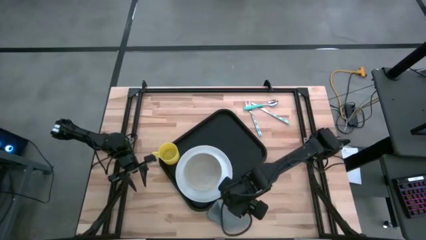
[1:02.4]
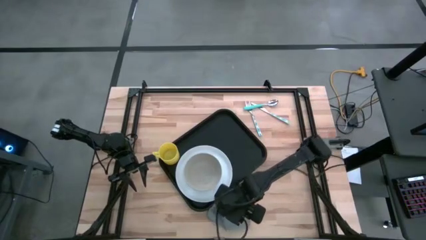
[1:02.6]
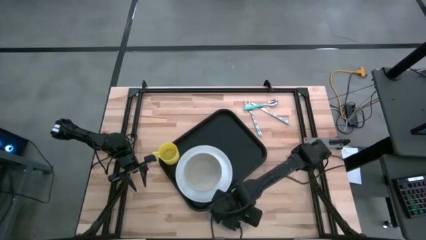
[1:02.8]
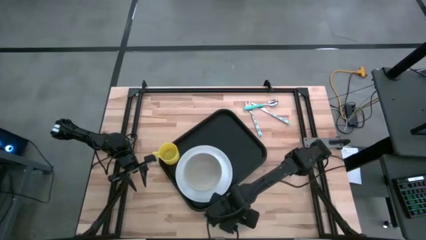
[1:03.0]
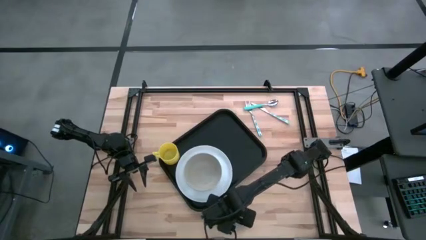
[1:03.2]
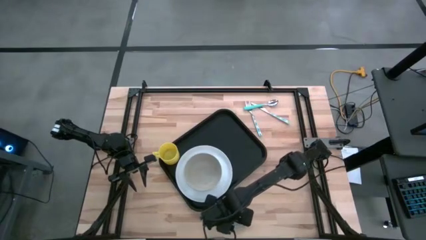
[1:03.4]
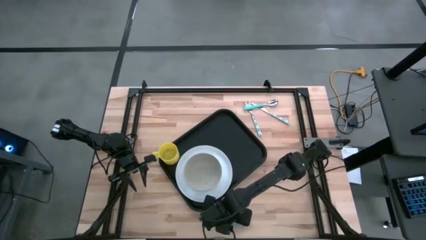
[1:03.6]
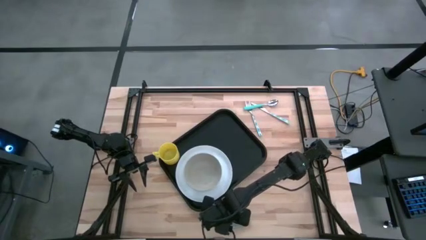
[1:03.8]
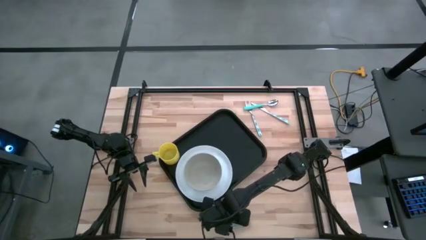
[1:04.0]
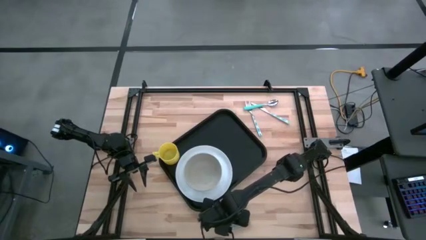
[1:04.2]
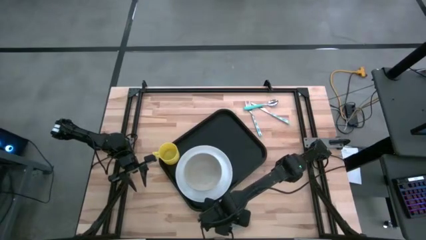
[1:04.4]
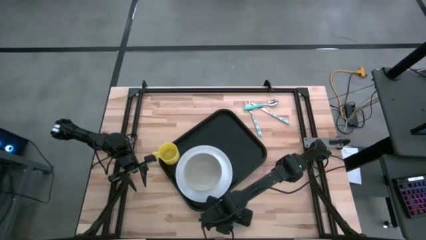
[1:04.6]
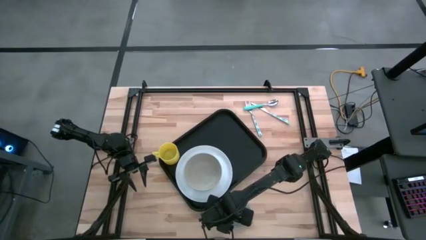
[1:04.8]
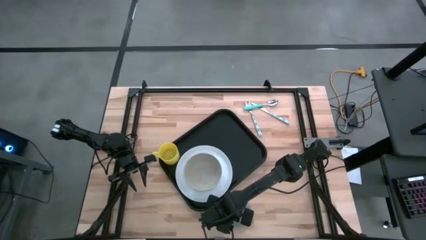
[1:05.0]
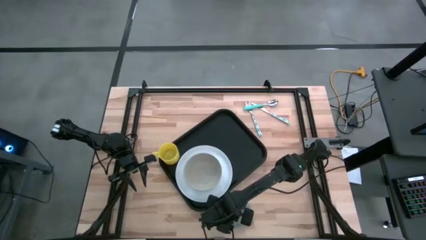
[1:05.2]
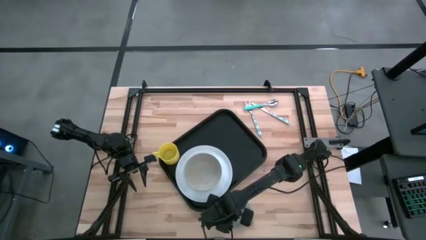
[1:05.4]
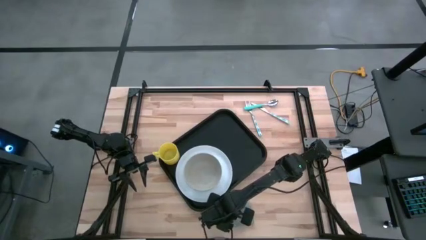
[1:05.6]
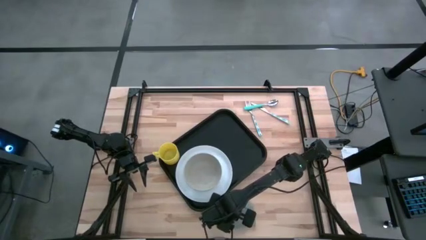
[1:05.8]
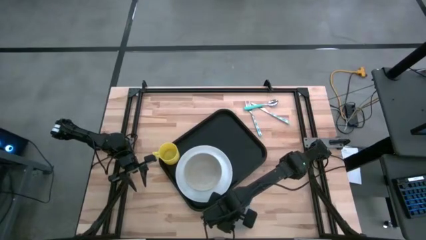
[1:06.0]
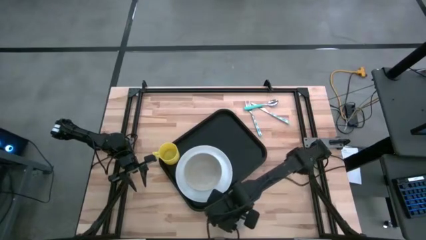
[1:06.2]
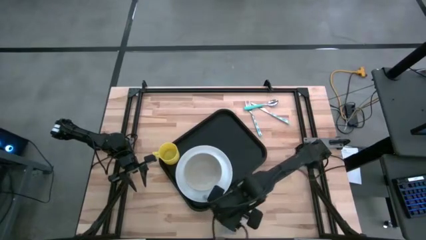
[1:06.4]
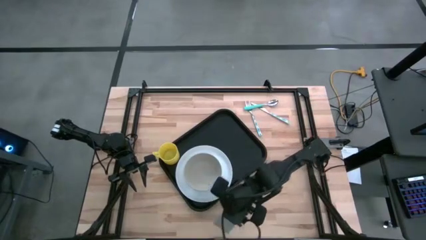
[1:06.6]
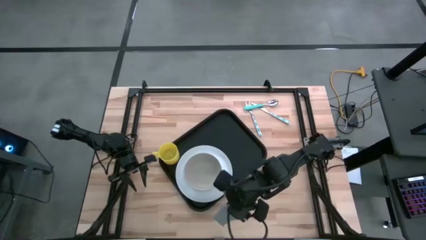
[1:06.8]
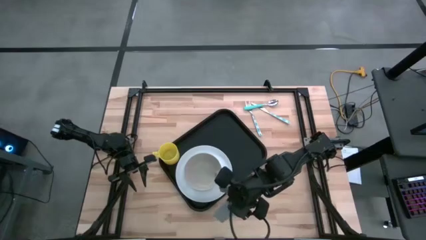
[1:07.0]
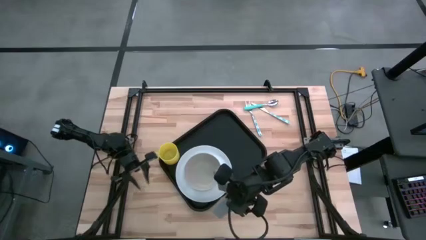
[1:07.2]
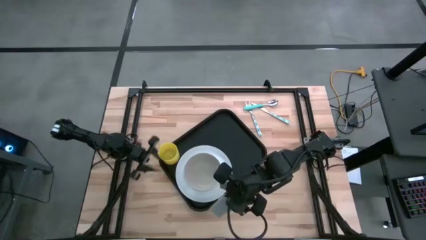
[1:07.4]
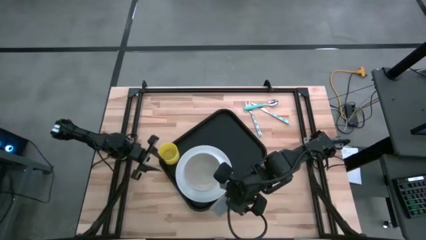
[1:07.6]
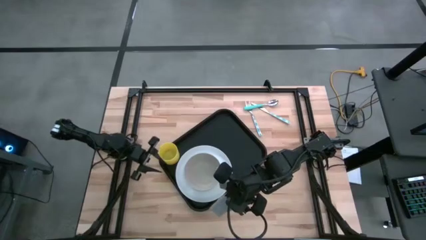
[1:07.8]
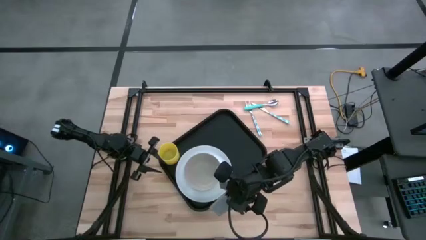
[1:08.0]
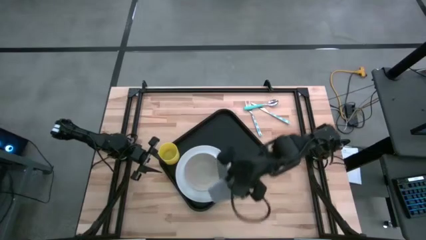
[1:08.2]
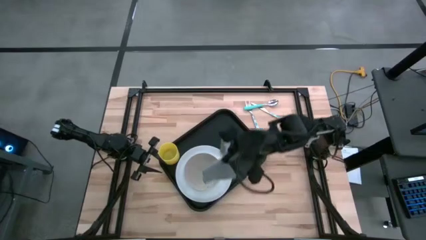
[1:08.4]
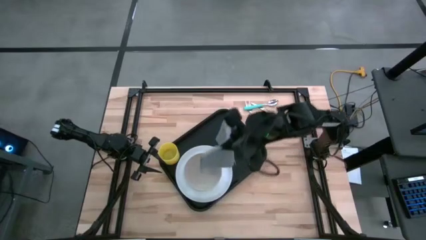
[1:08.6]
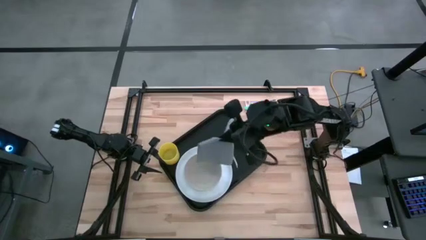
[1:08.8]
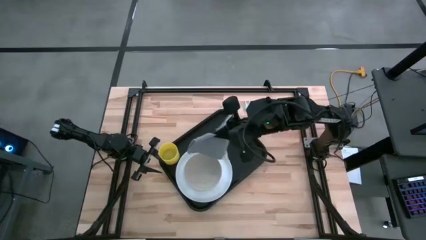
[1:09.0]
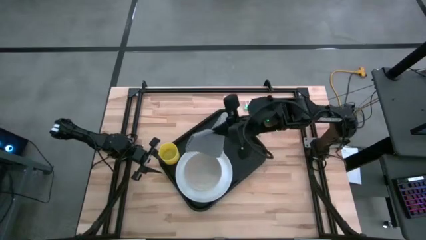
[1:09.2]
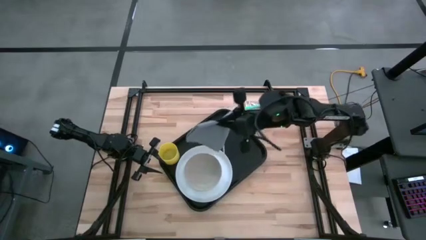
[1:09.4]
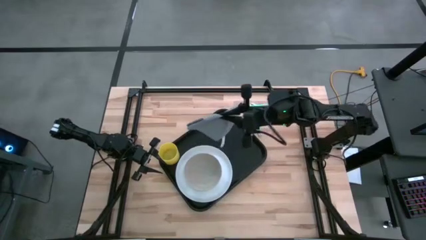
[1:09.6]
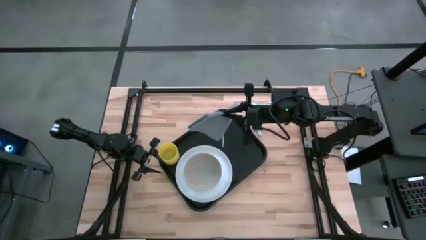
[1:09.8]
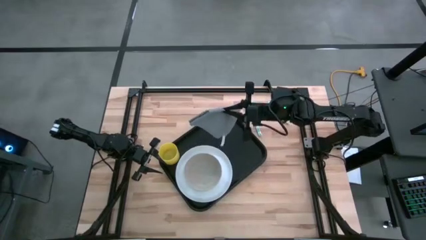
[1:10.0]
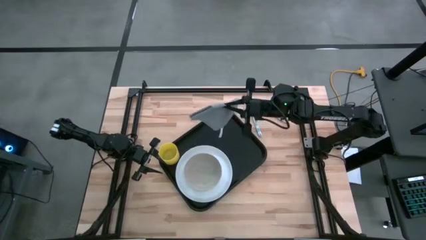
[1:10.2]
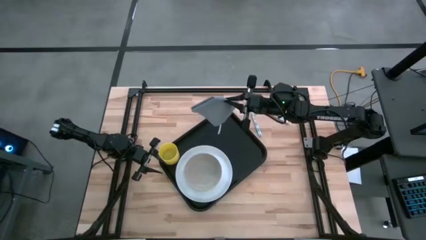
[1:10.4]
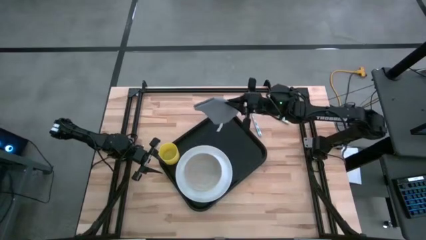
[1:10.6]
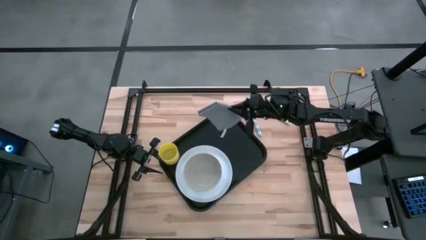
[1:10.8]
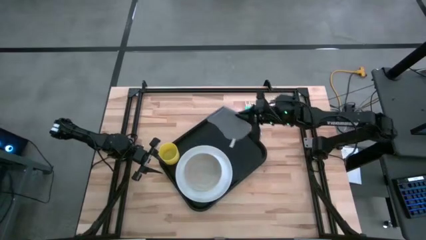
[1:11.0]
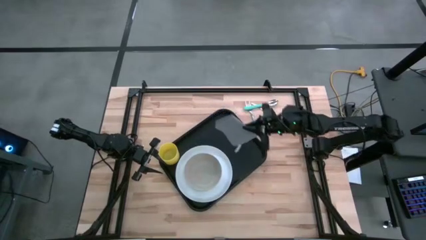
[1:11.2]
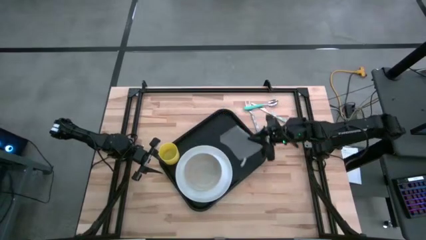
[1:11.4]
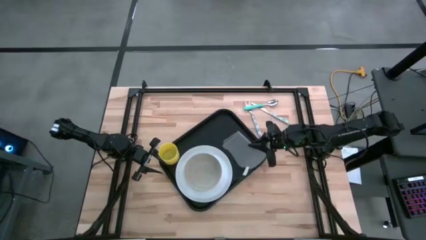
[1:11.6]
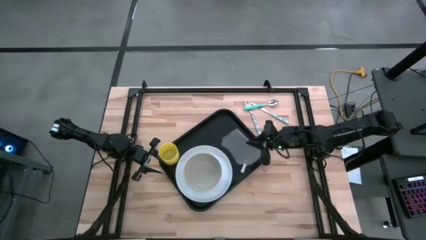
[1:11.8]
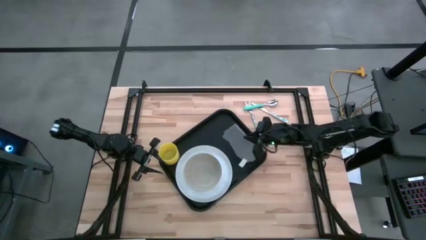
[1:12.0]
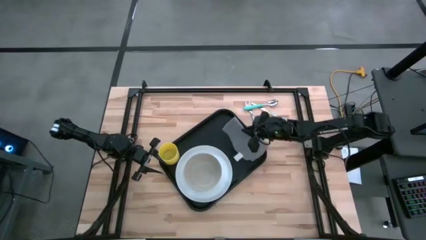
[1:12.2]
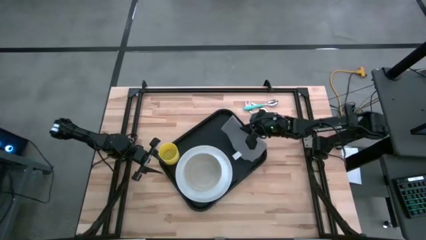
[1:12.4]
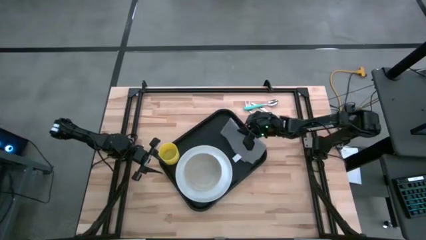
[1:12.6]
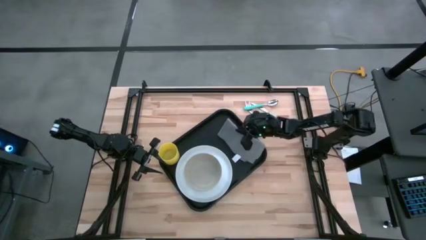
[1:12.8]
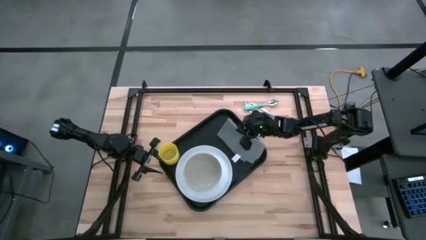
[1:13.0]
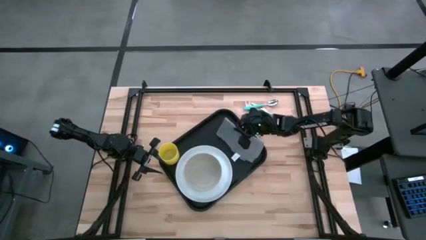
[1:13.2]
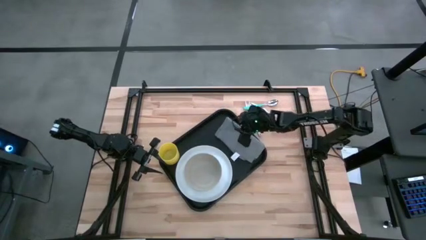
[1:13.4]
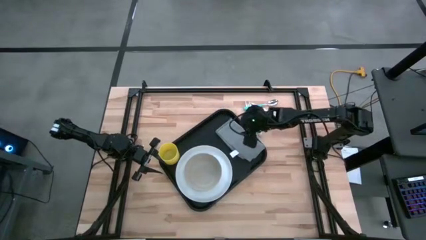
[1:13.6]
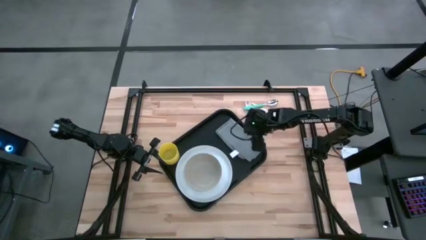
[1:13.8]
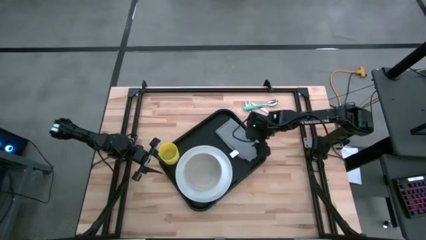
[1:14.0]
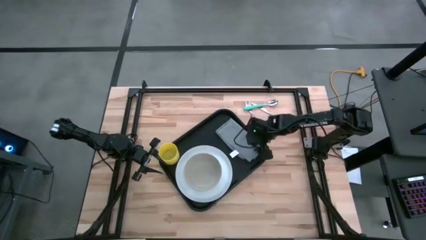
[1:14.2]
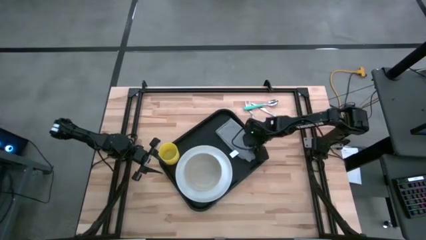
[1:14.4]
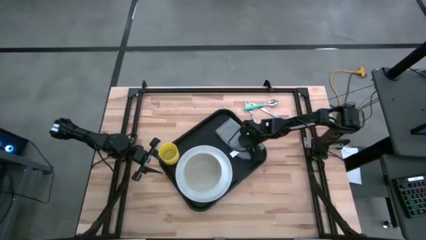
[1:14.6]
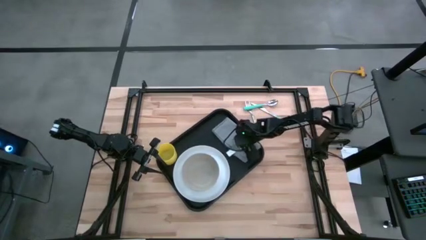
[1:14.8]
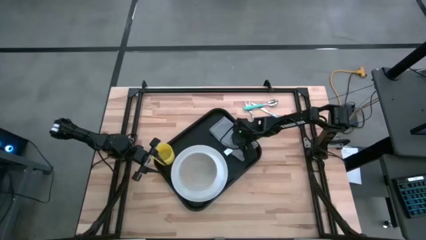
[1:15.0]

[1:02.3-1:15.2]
Task: Set up tray
Put the gray napkin on the black tray to the right of the white plate

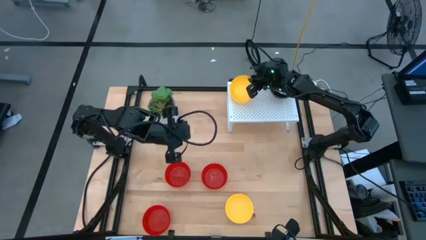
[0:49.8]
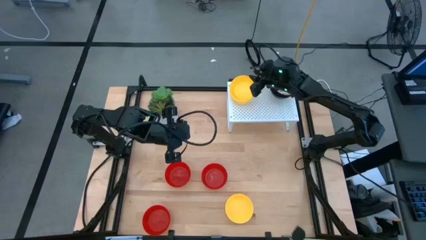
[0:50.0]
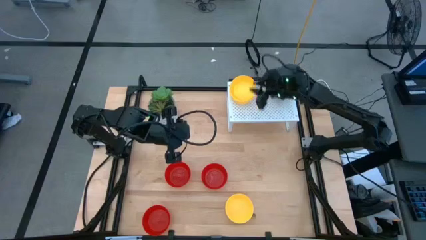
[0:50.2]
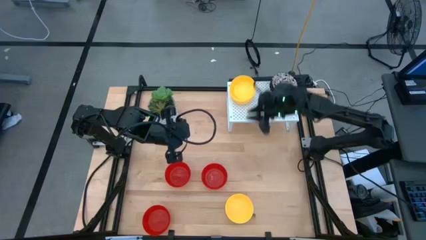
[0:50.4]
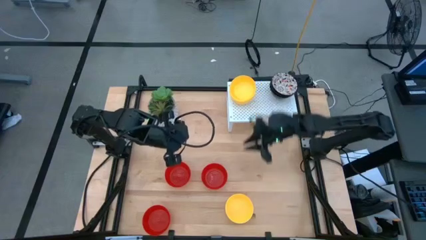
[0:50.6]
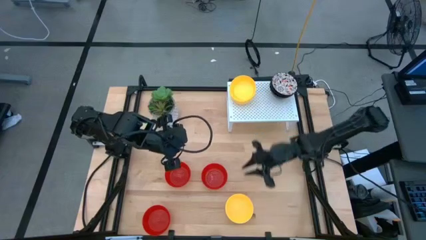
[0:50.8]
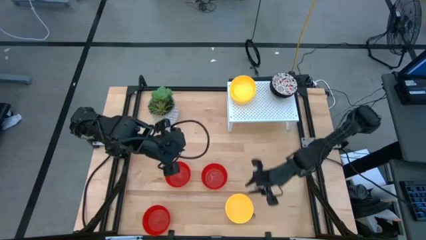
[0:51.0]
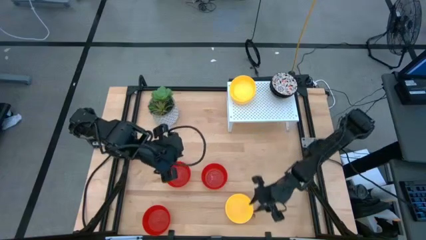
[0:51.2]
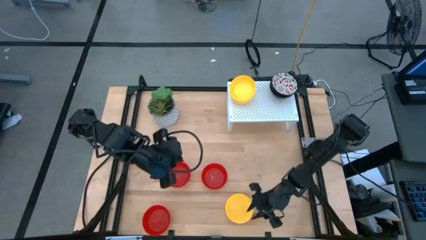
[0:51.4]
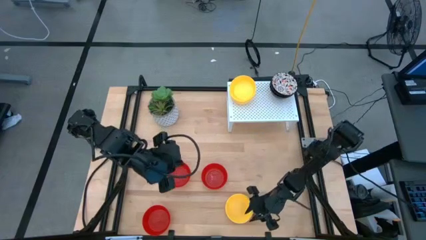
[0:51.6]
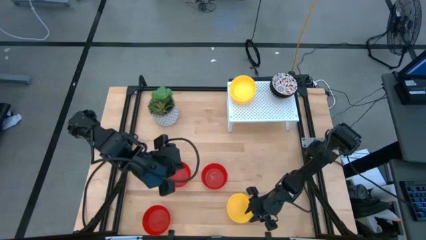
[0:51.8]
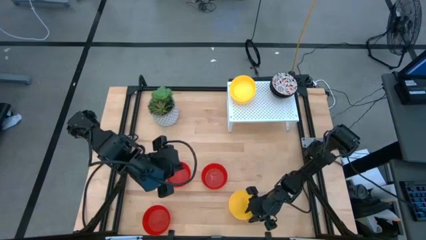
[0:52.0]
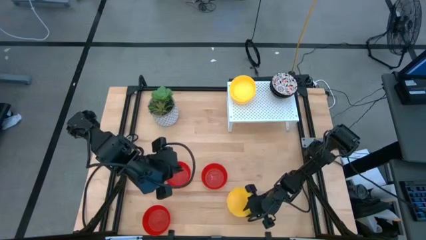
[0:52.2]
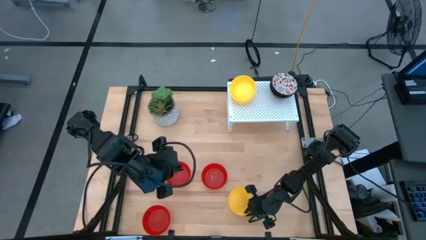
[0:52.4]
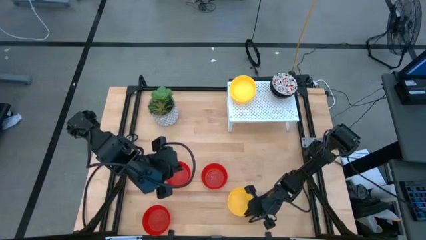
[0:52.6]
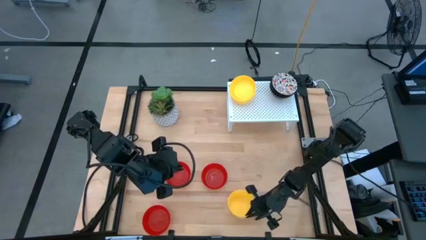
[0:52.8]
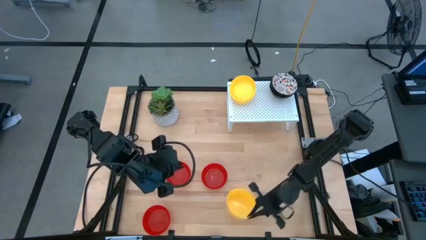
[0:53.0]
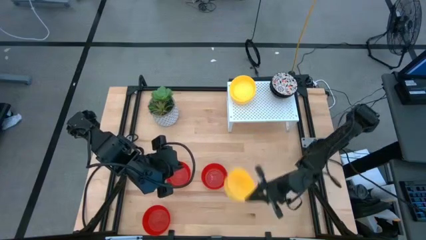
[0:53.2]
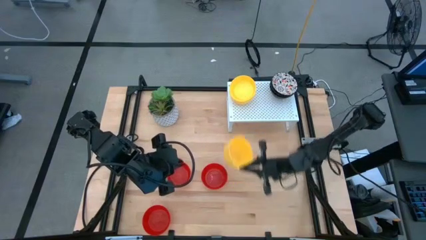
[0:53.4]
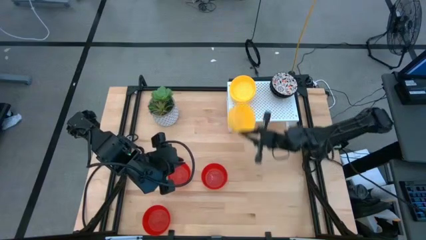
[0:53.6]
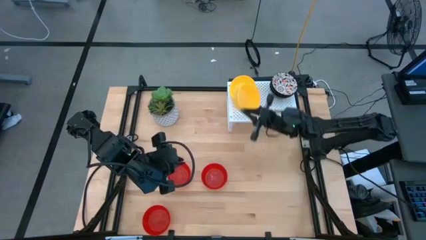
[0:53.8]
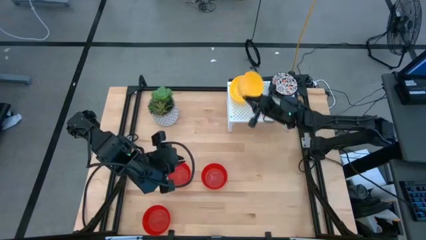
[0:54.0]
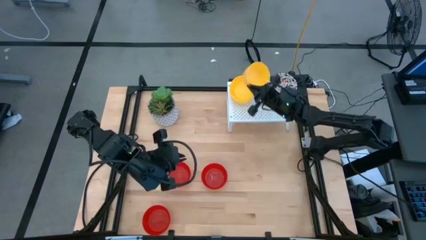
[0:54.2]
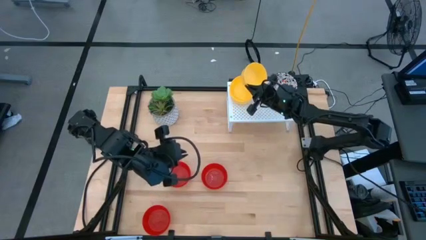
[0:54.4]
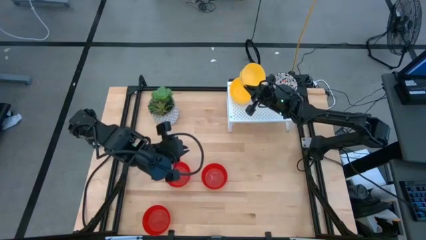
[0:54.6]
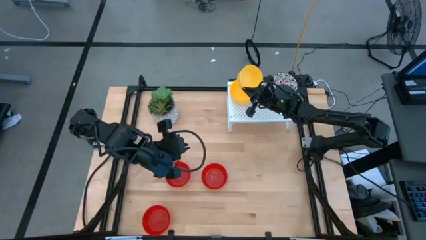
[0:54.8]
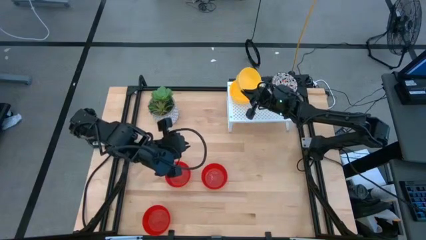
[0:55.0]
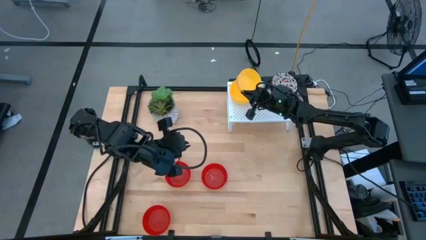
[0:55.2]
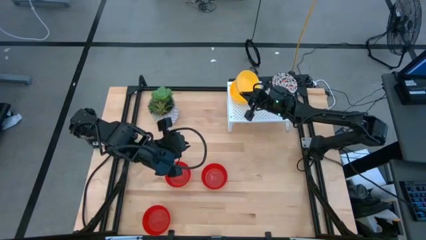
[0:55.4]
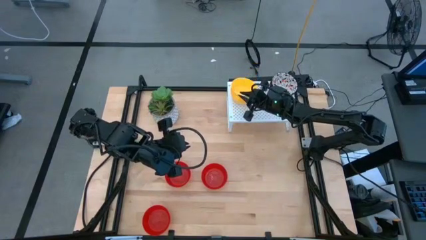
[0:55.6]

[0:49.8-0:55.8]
Task: Pick & Place Mini bowls
Stack the yellow bowl on top of the yellow bowl on the shelf
